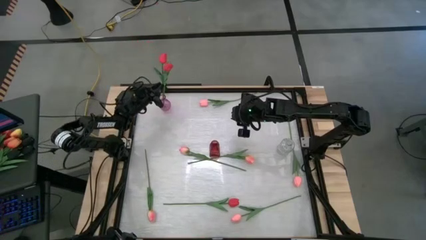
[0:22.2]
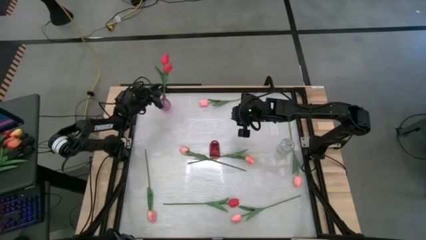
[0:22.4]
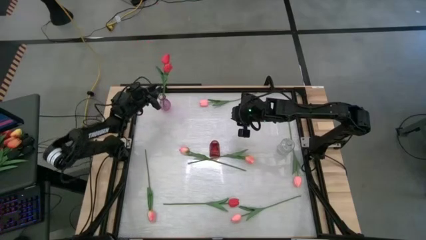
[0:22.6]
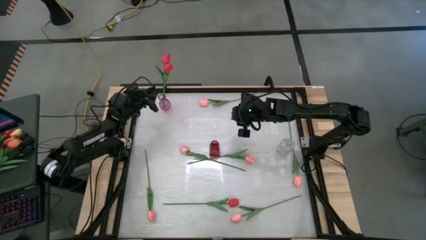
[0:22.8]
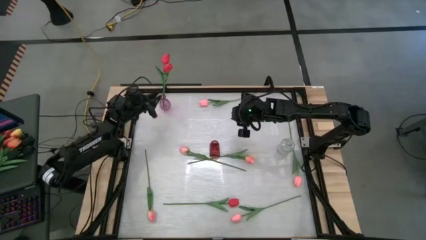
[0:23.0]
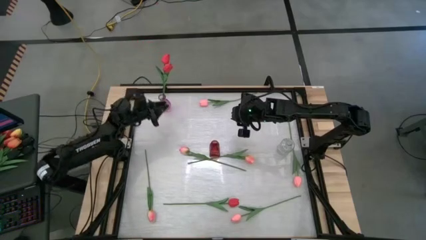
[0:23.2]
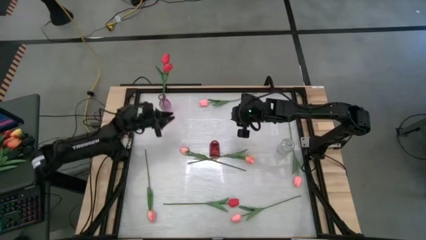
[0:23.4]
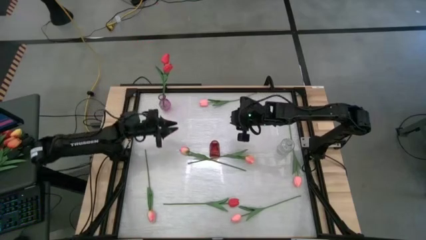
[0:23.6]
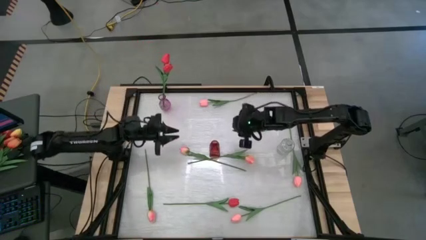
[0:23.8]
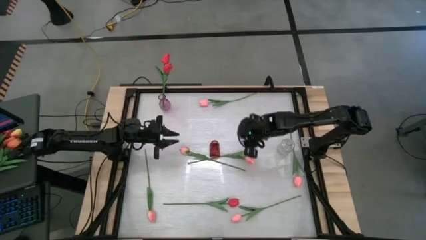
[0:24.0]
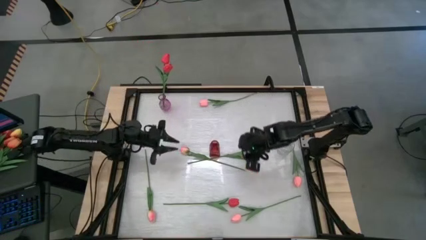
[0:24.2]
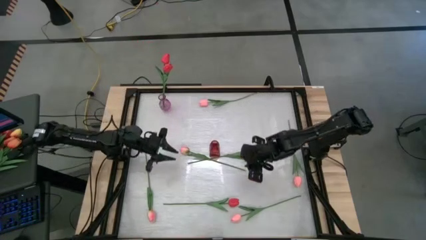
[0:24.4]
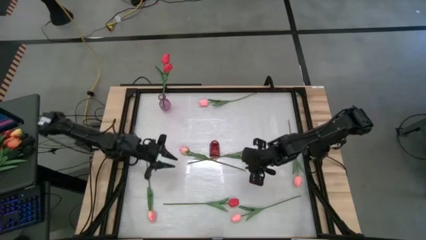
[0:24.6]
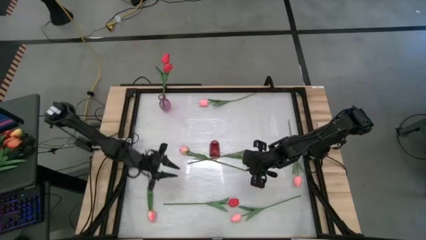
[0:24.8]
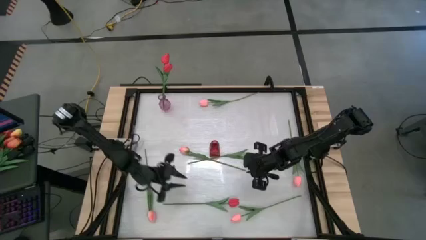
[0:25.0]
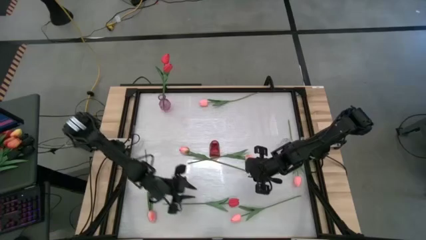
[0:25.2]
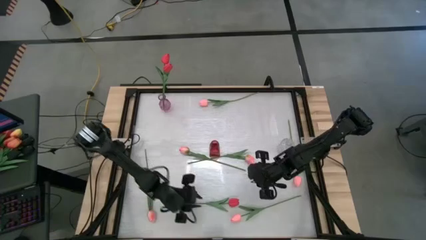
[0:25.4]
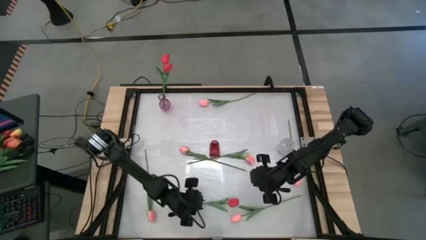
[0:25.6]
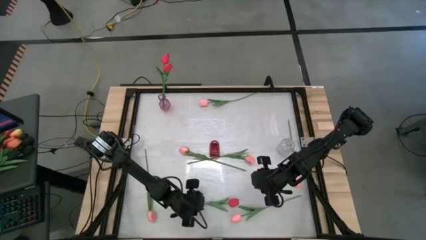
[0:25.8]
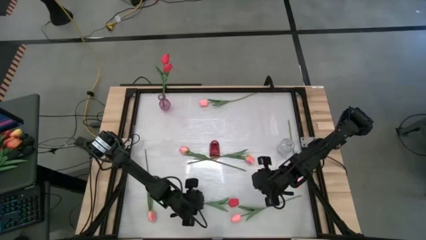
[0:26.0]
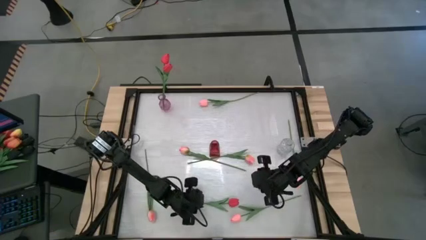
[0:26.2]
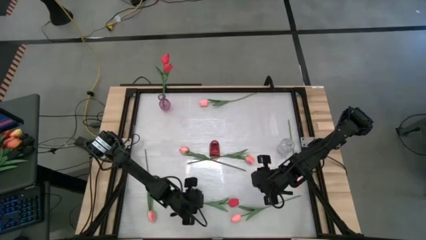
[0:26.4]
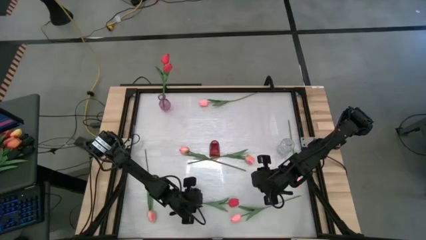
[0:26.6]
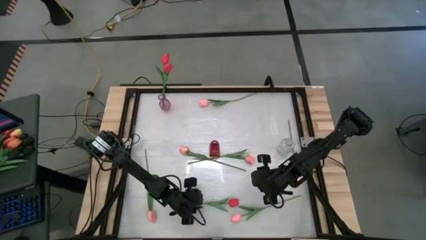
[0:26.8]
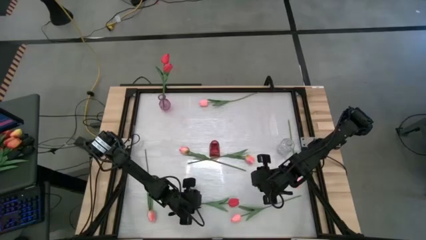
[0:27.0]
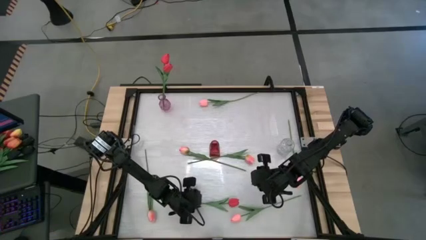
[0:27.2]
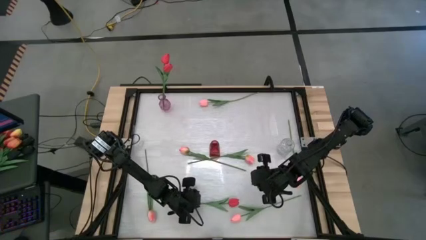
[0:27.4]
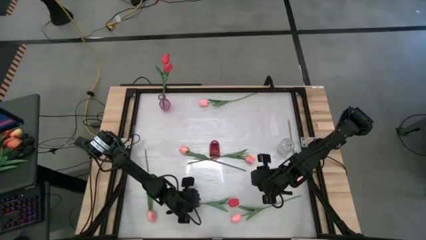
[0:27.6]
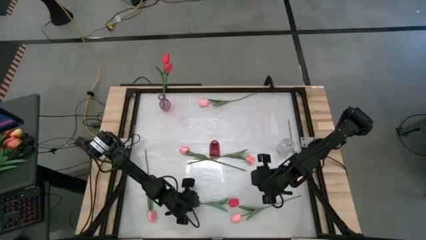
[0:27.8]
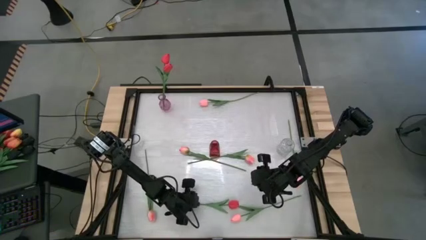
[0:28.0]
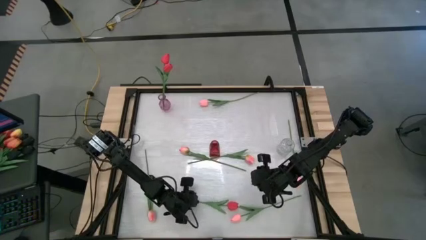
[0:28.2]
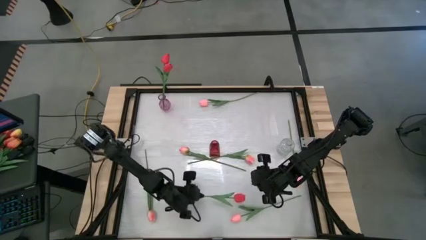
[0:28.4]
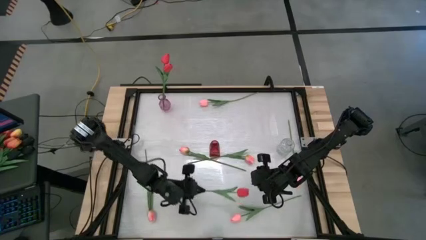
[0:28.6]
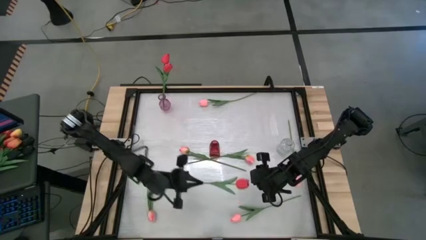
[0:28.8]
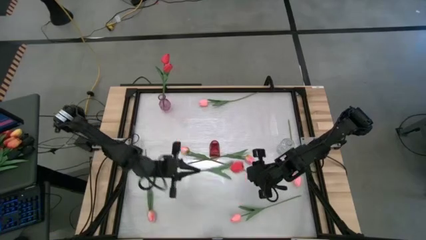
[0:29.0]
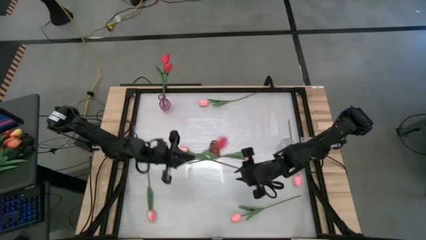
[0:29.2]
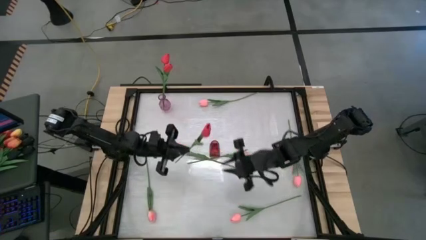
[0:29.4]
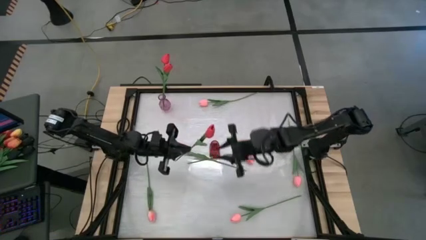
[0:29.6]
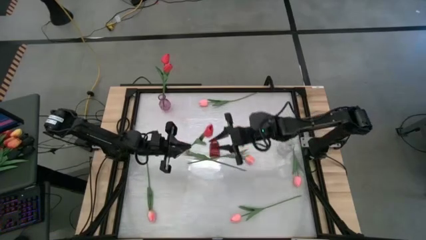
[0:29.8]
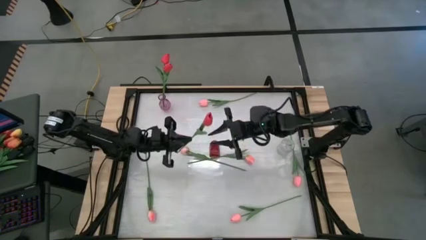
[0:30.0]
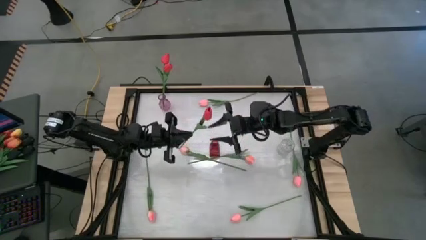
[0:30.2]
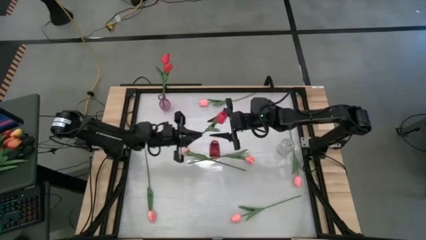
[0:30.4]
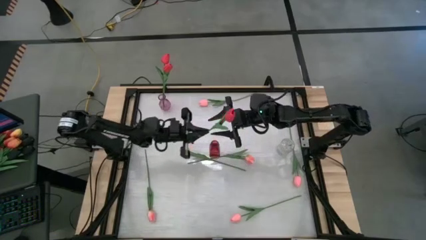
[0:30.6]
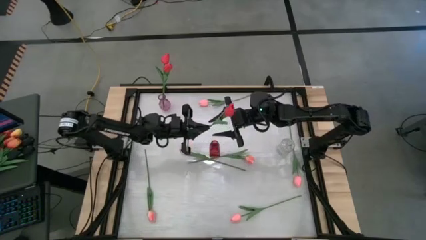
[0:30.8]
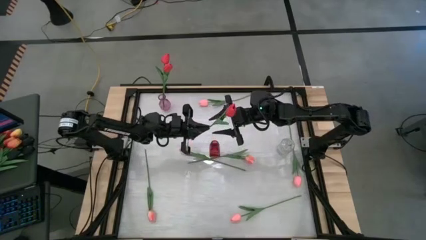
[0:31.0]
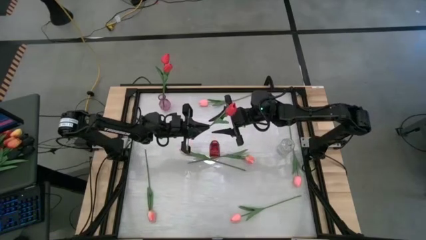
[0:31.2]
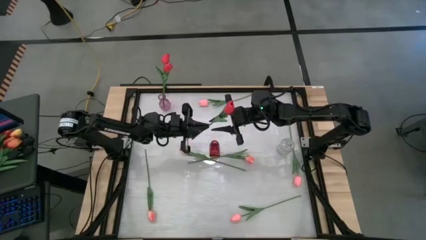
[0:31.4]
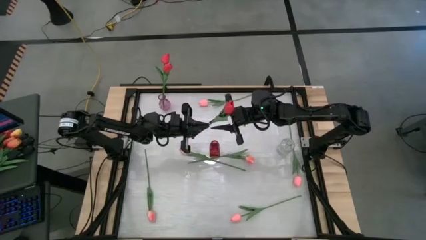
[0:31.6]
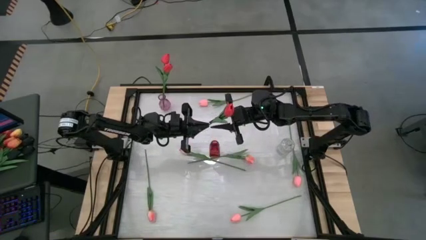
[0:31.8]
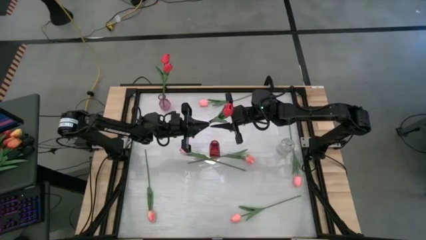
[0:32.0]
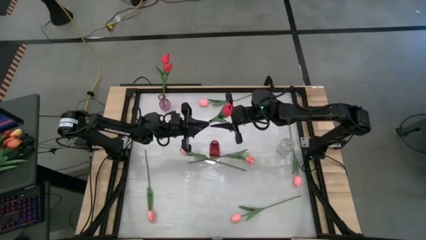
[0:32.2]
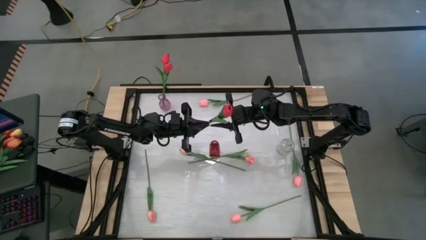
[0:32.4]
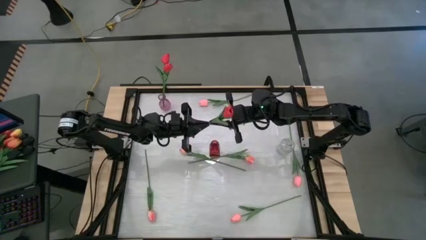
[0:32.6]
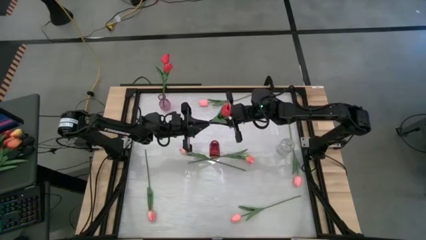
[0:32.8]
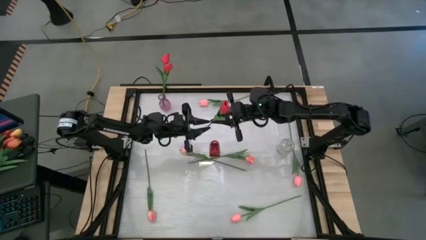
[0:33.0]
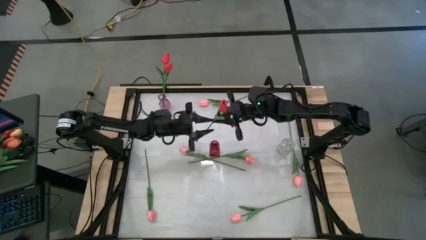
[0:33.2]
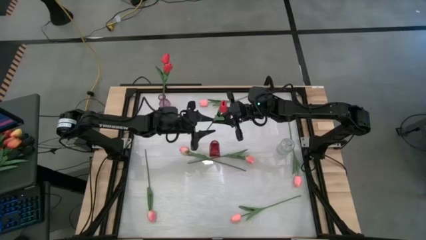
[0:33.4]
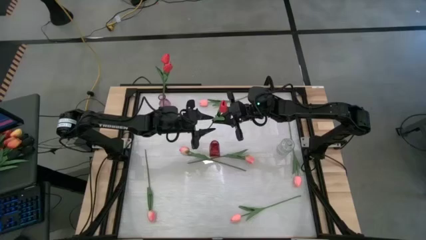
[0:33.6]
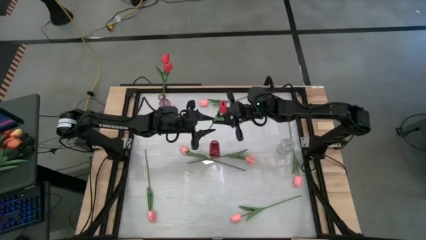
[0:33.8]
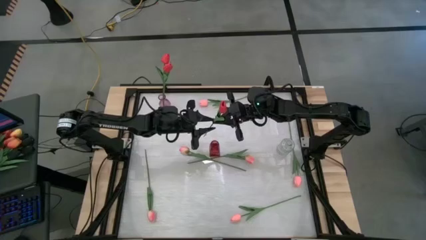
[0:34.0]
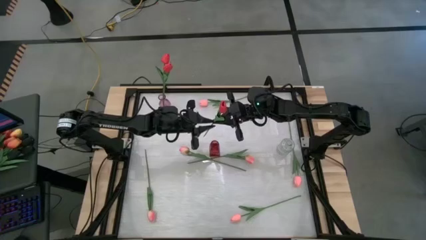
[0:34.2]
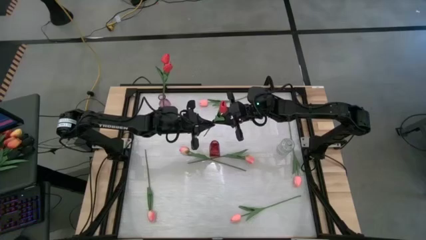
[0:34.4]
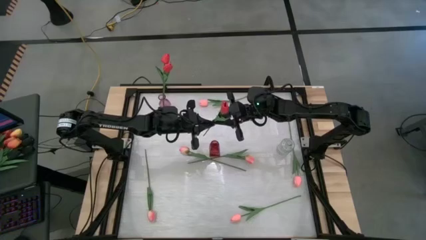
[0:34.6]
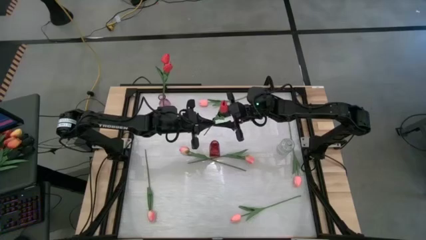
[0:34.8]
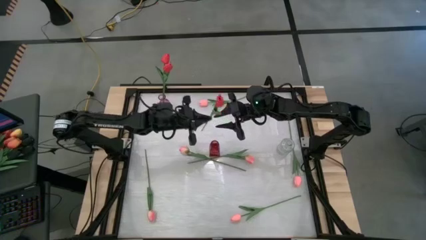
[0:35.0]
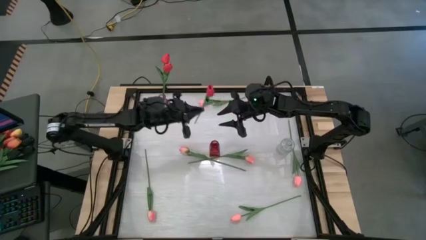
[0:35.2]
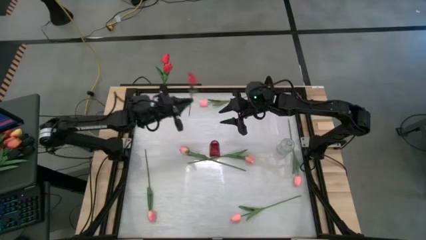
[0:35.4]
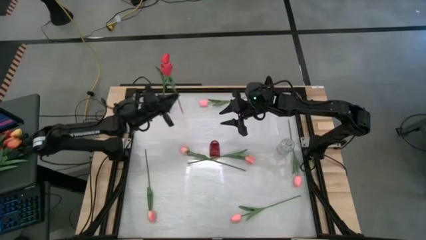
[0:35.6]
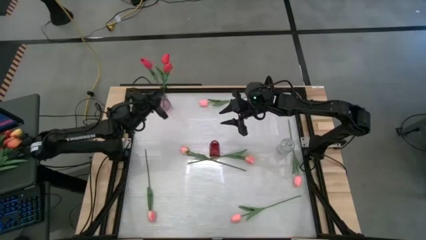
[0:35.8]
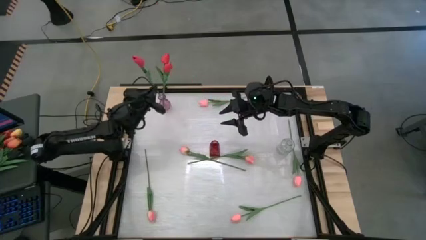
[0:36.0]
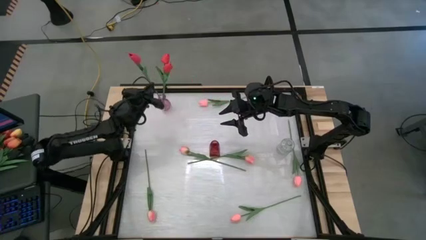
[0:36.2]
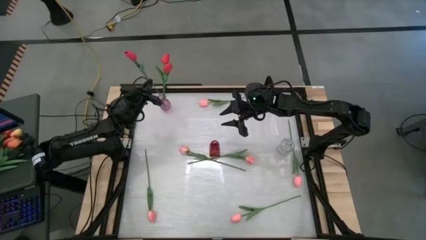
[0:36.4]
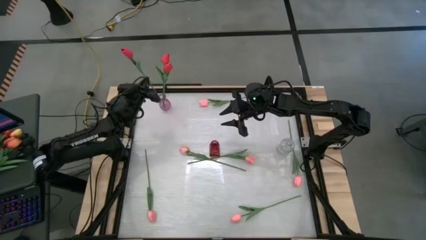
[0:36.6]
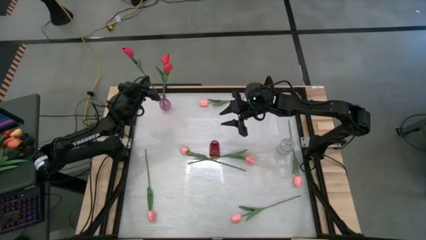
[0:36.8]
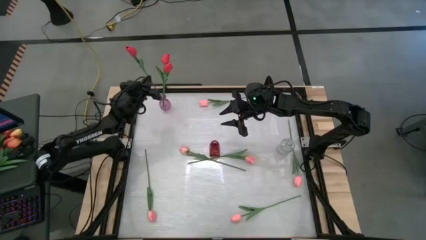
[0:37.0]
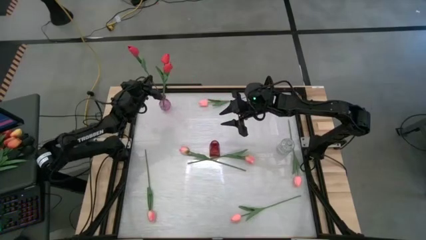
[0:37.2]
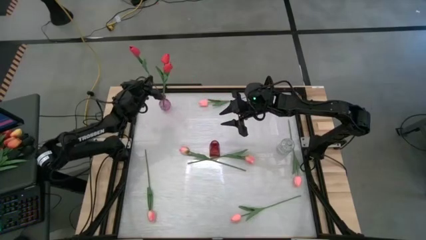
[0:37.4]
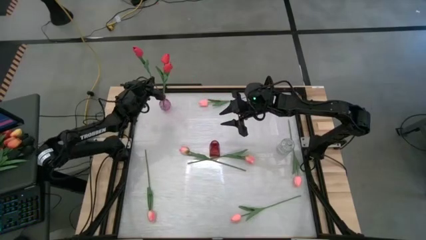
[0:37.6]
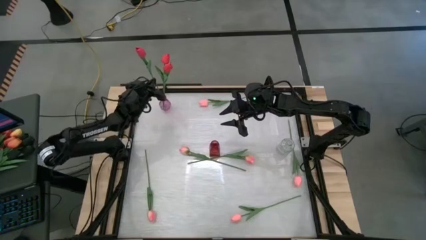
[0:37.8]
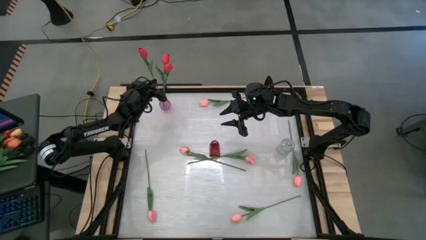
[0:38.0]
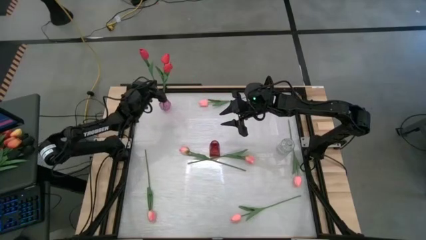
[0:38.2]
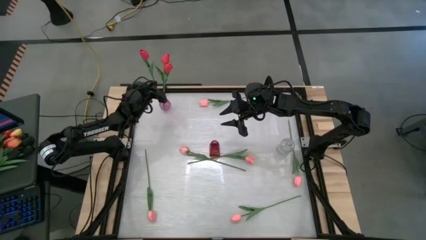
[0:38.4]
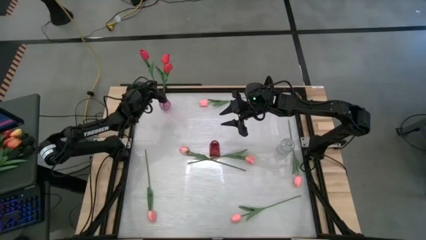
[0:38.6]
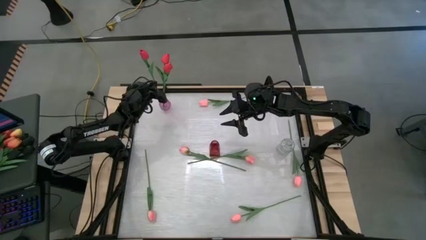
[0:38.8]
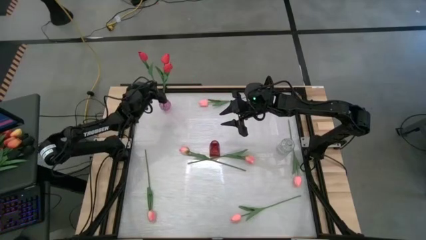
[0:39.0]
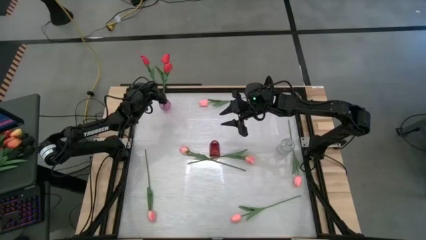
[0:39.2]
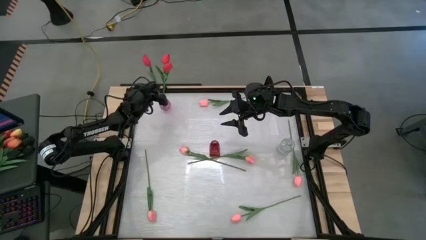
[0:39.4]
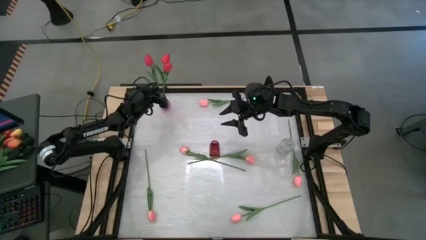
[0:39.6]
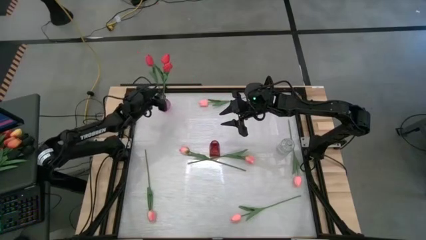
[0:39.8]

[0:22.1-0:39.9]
Task: Sort flowers into vase by color
Put the red tulip into the violet vase
